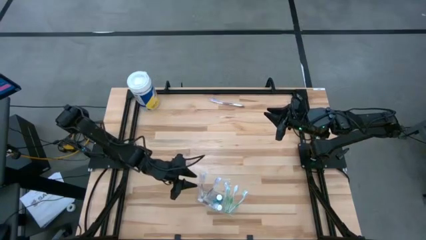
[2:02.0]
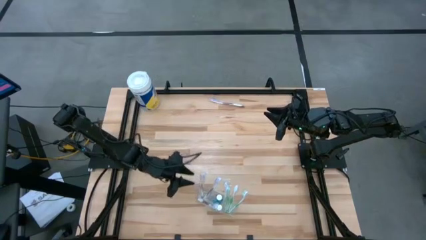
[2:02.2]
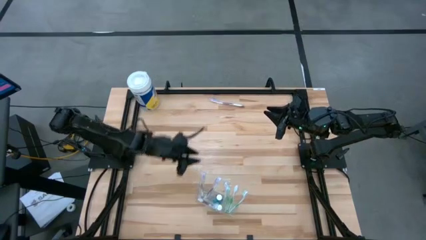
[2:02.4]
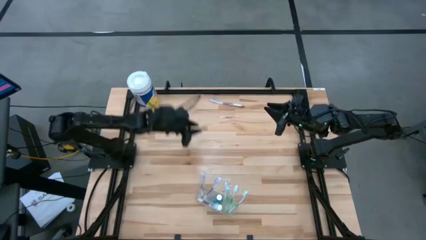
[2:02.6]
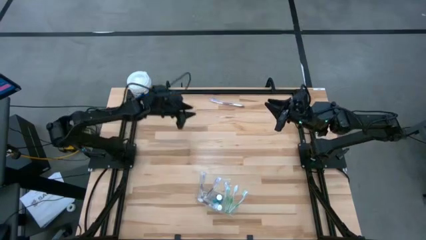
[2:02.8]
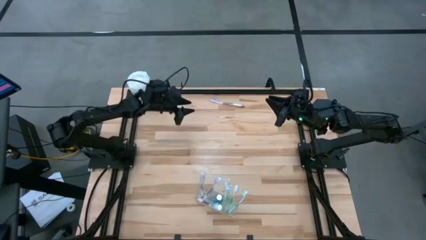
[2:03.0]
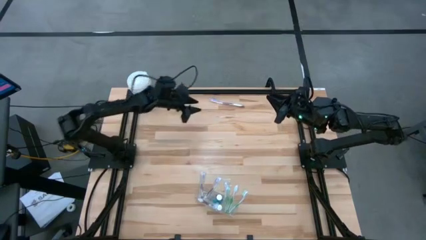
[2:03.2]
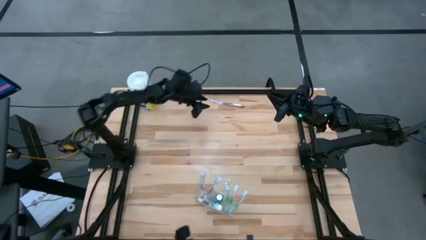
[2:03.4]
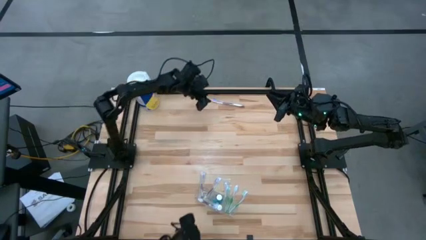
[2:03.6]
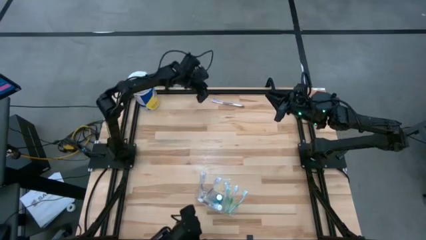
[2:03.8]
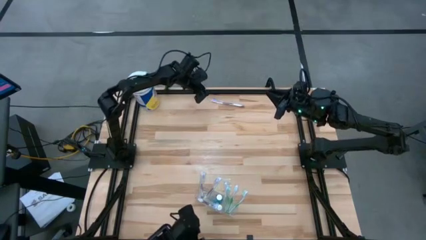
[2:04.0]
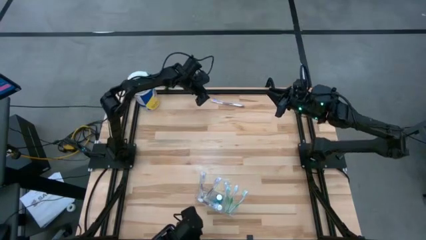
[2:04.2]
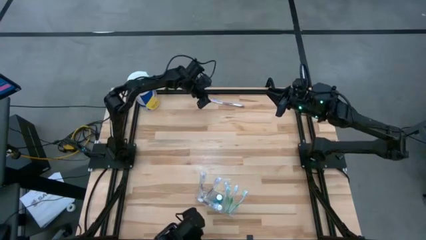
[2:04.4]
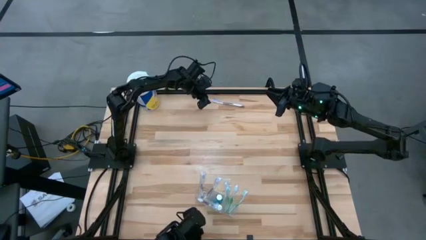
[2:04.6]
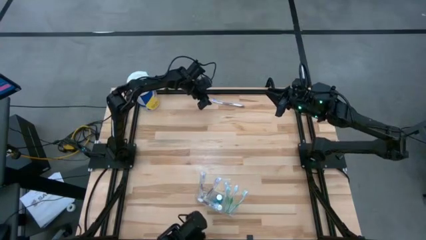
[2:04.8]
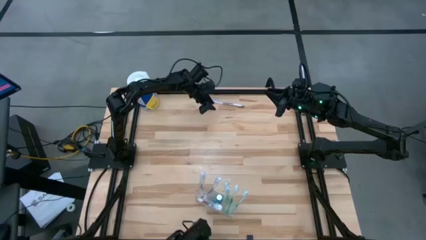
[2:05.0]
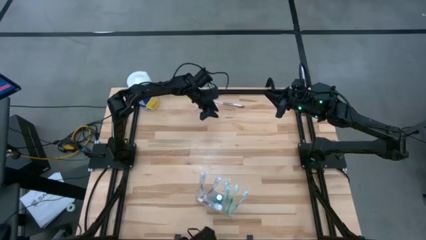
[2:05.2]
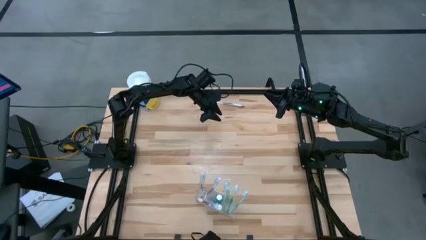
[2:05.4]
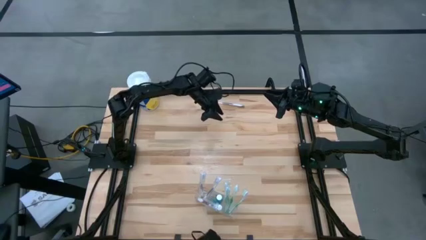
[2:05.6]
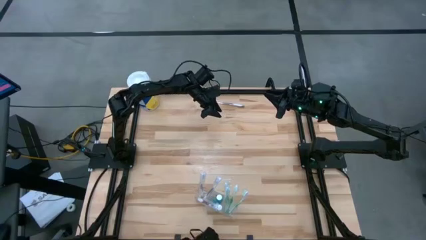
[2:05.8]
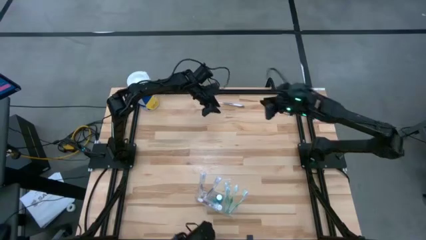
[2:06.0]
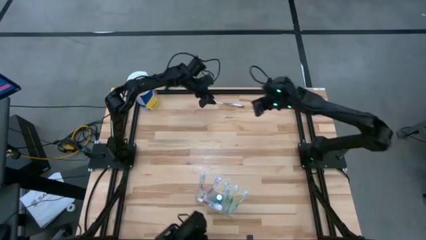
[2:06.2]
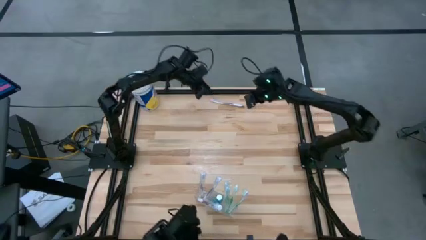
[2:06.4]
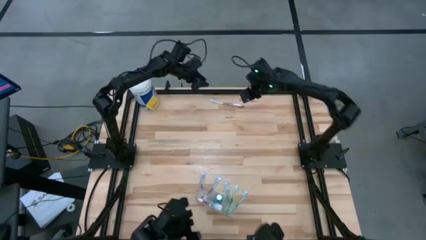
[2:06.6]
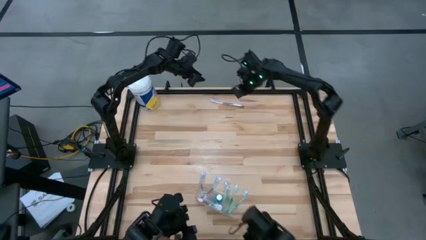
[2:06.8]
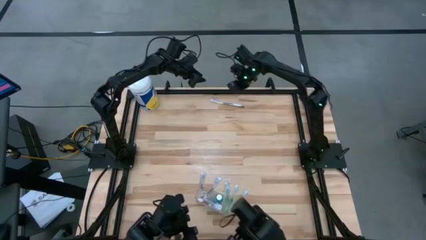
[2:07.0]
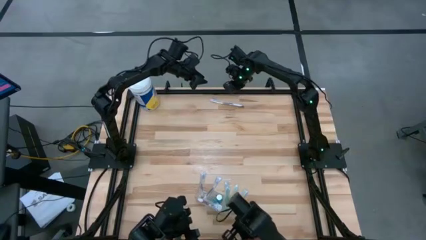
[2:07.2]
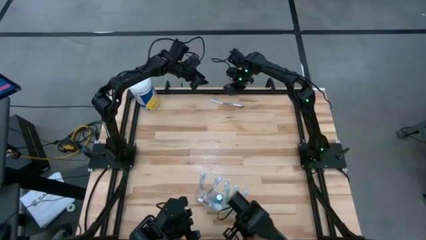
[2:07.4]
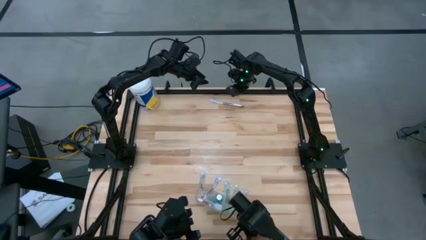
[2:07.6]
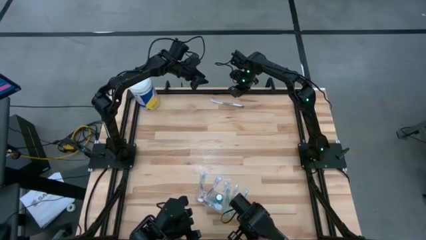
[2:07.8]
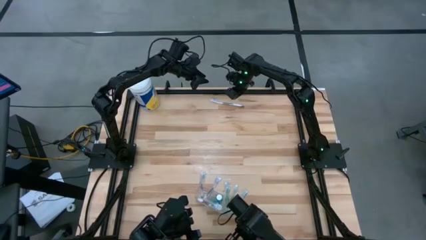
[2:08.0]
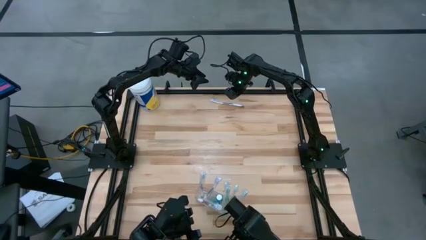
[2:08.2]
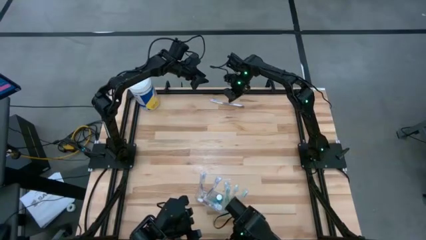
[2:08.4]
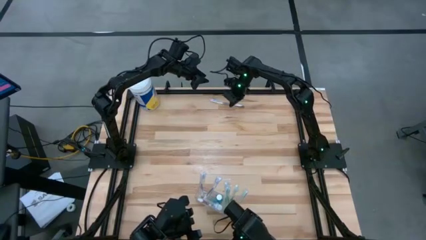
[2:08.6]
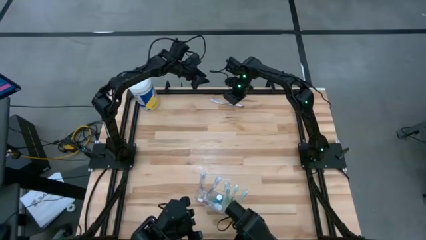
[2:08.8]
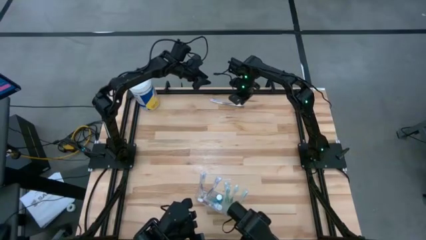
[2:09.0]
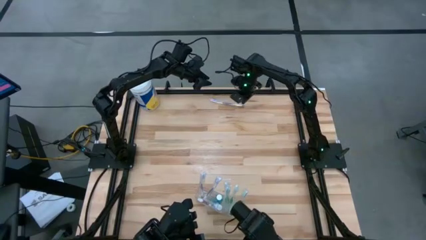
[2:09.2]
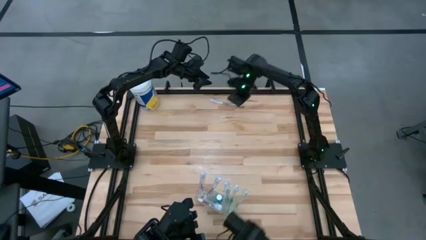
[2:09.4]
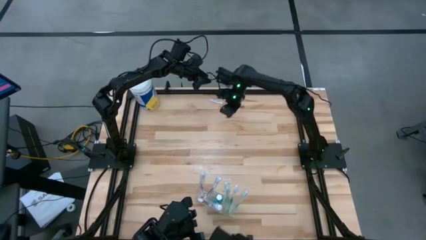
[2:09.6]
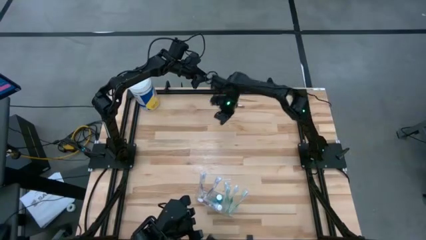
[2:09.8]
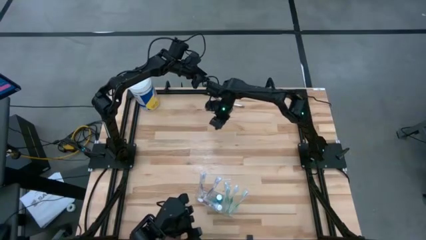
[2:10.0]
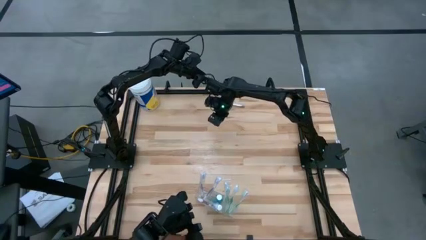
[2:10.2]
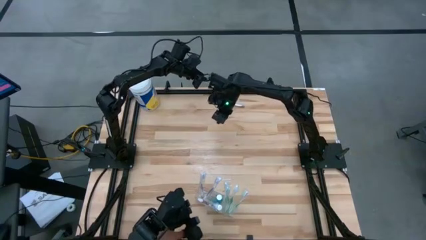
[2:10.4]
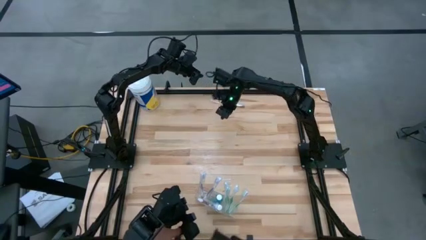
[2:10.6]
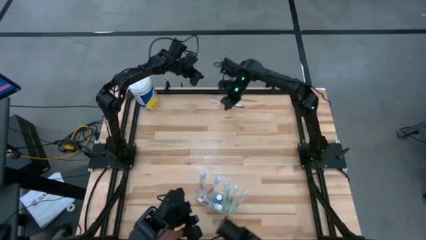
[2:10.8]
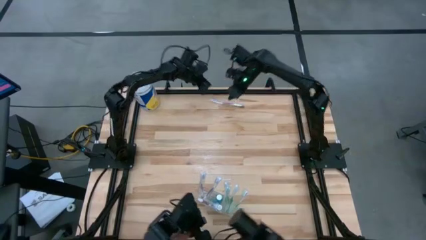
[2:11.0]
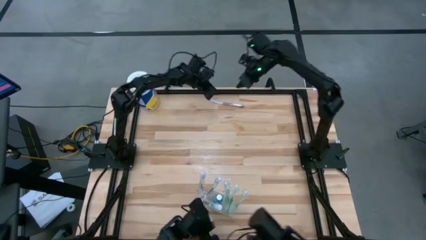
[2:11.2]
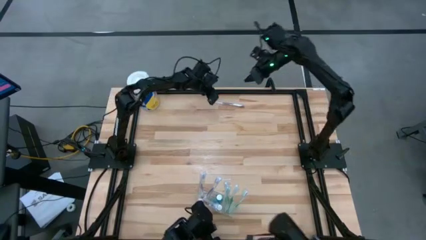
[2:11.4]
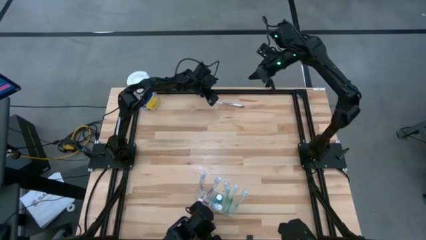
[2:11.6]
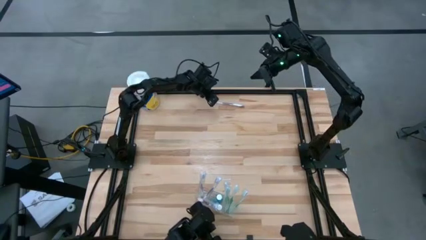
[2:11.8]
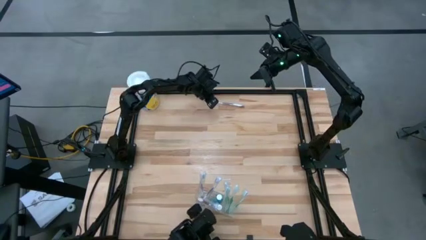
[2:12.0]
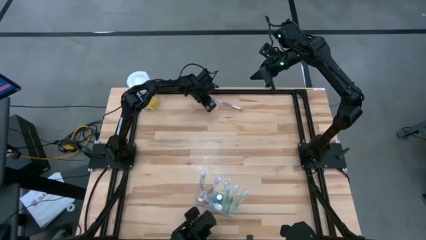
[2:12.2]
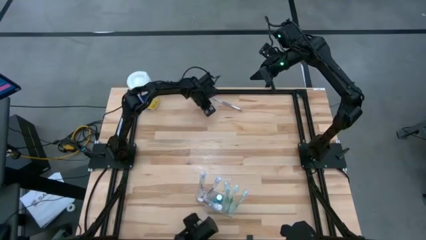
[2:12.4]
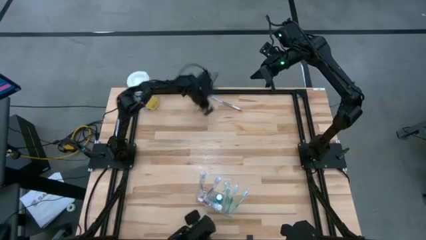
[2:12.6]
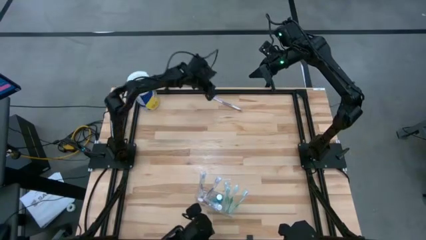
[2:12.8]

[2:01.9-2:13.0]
Task: Pick & Place toothbrushing station
Put the purple toothbrush in the transparent organizer

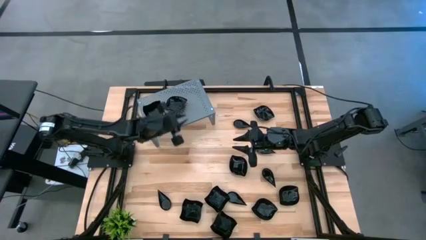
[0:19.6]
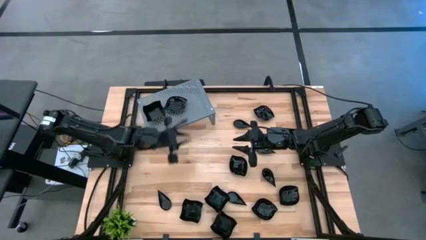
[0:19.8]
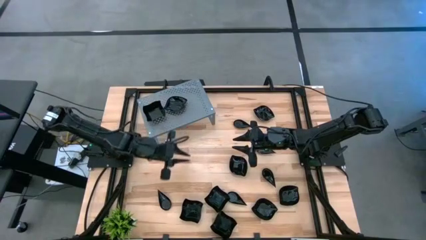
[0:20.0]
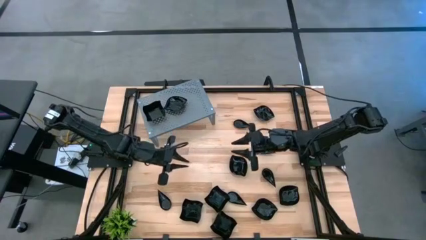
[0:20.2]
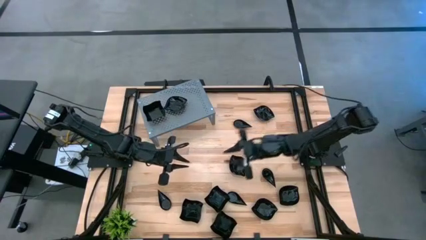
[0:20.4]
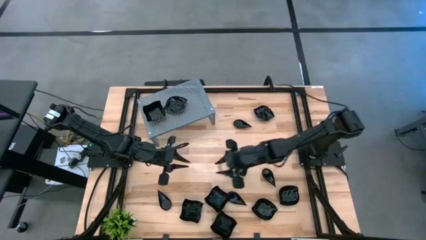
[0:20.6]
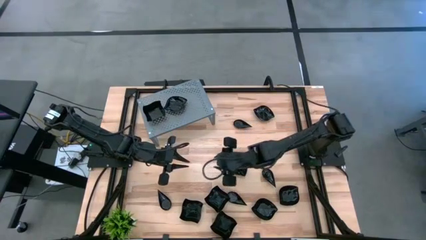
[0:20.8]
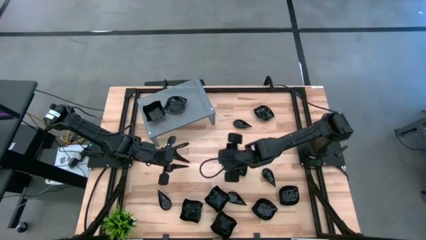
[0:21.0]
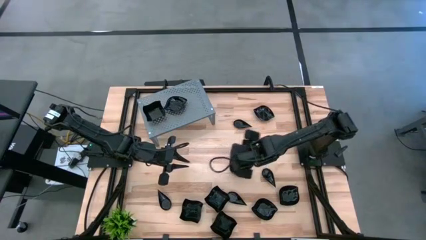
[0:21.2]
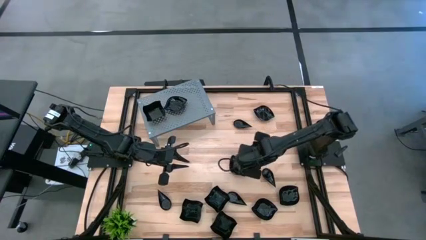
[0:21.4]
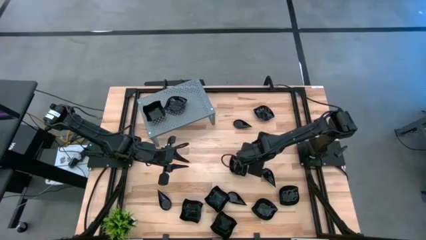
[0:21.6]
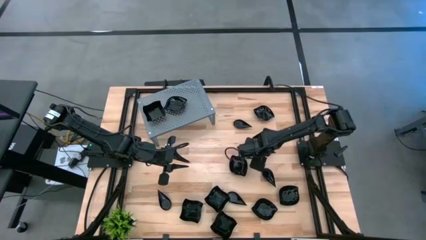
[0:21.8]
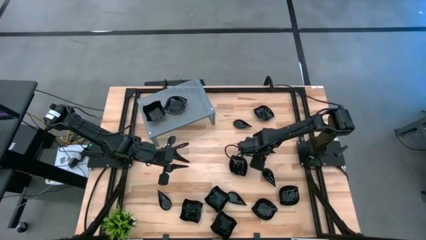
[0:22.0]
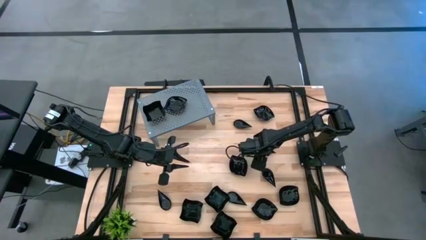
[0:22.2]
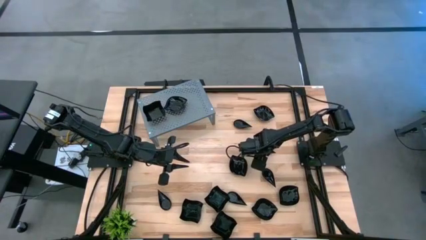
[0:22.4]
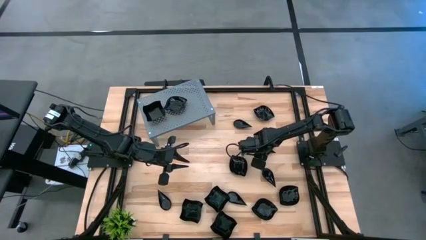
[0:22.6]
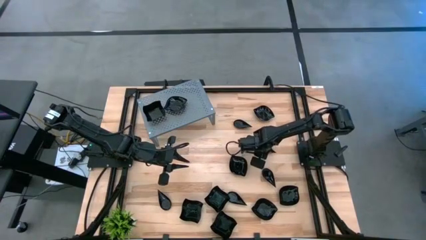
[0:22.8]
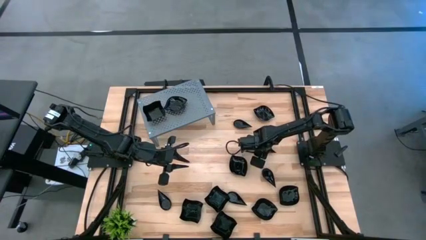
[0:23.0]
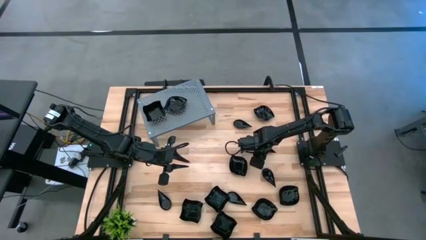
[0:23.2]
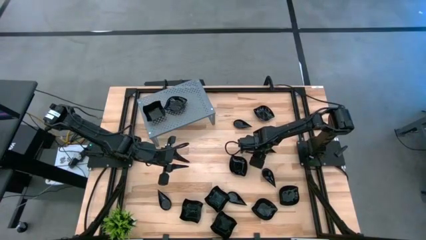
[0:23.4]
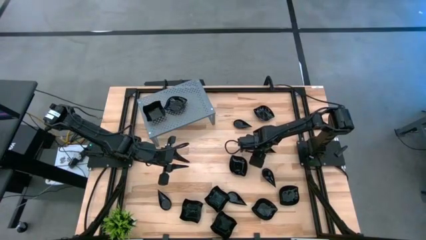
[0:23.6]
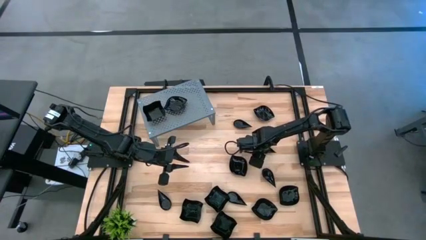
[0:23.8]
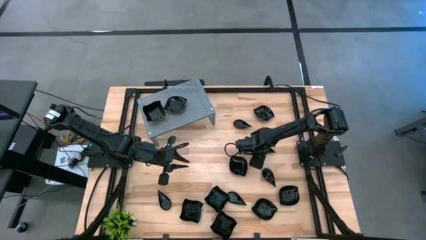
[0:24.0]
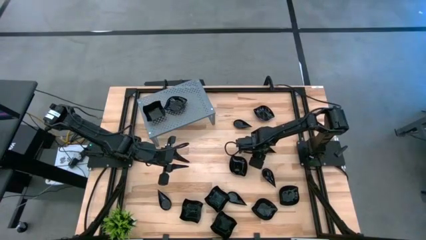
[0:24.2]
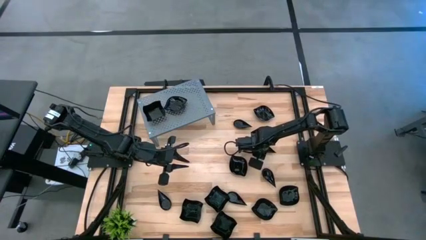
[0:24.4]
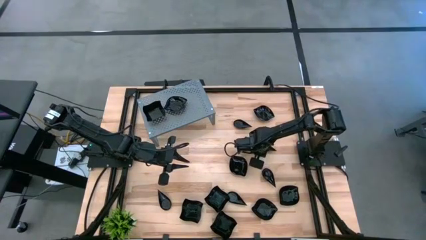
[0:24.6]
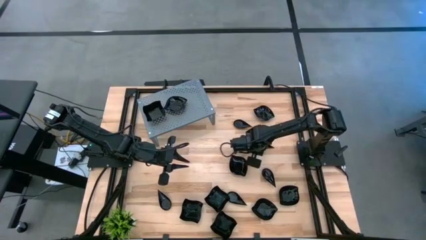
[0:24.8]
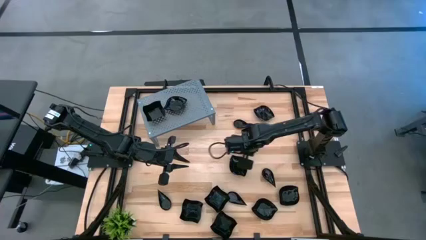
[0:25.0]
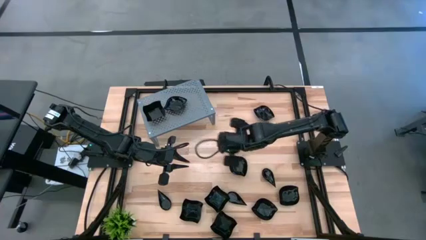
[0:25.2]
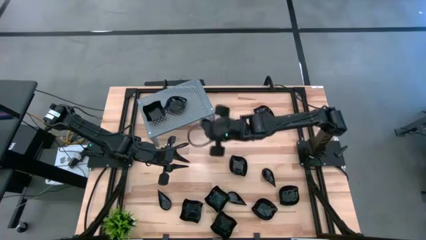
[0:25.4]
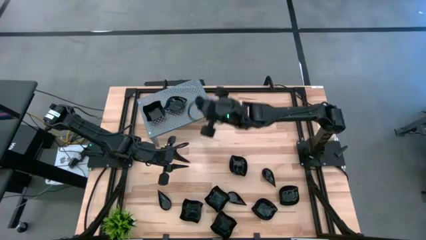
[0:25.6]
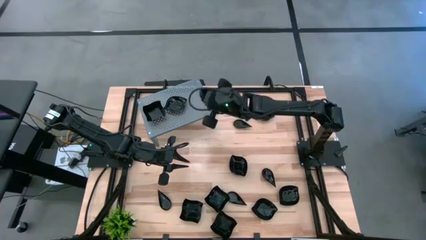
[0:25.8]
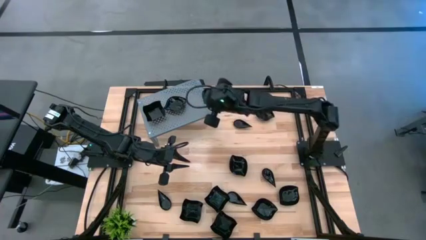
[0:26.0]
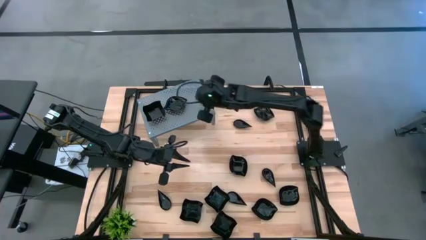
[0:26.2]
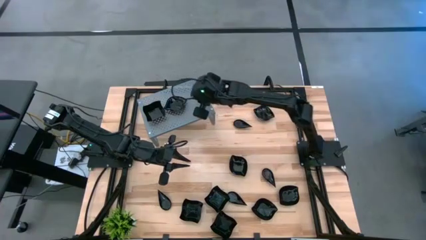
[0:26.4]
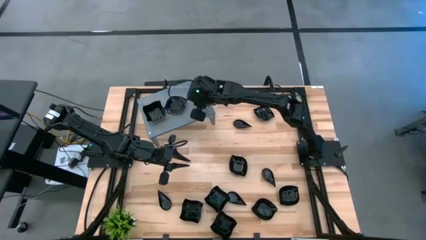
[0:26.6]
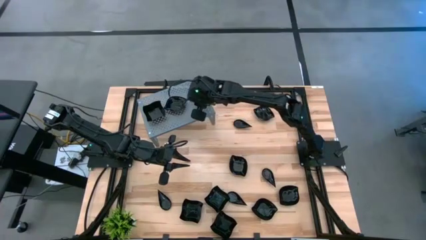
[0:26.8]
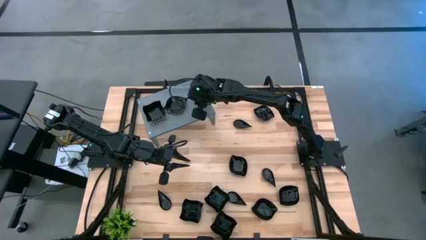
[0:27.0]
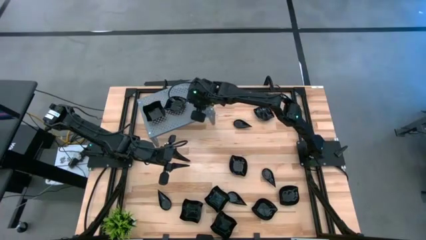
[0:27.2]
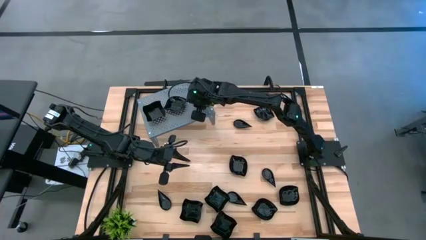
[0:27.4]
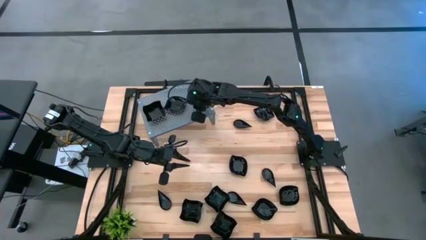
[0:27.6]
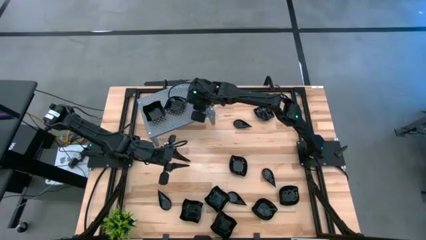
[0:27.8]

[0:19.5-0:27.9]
Task: Pick & Place Mini shaped plates
Put the black drop shaped plate on the shelf
